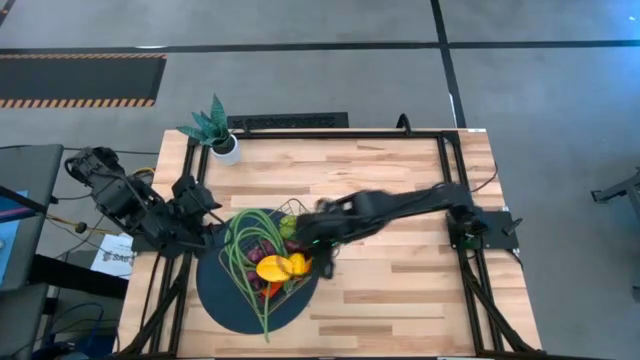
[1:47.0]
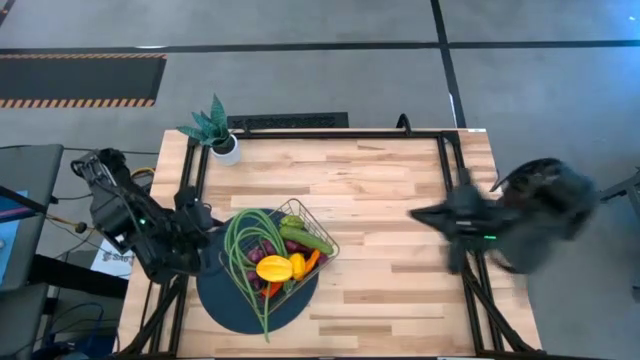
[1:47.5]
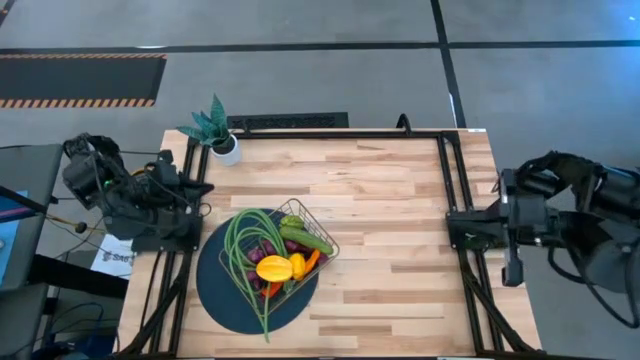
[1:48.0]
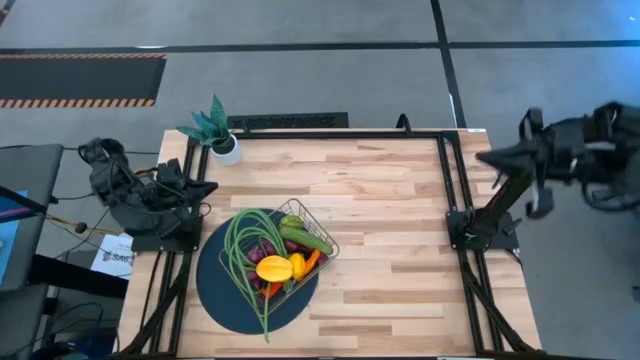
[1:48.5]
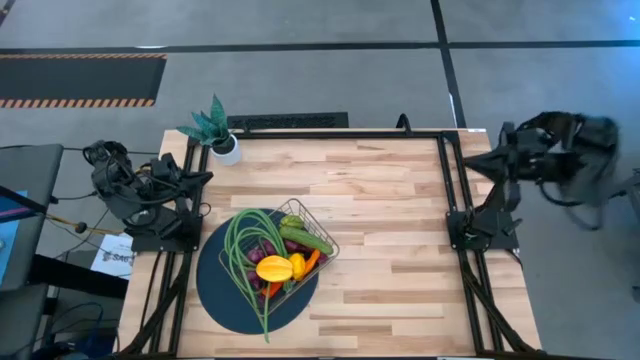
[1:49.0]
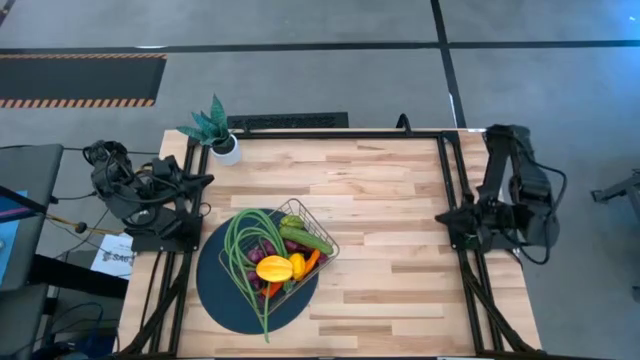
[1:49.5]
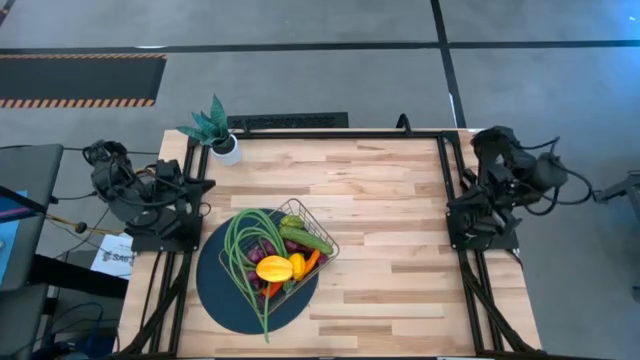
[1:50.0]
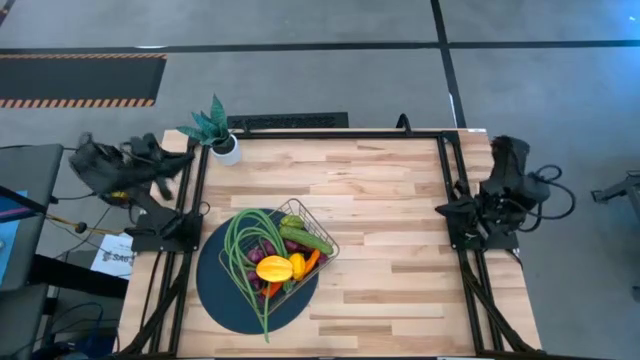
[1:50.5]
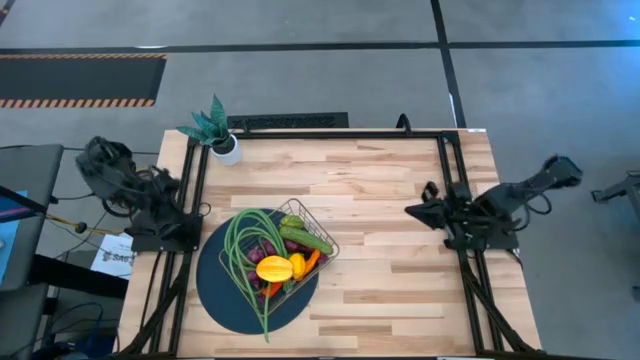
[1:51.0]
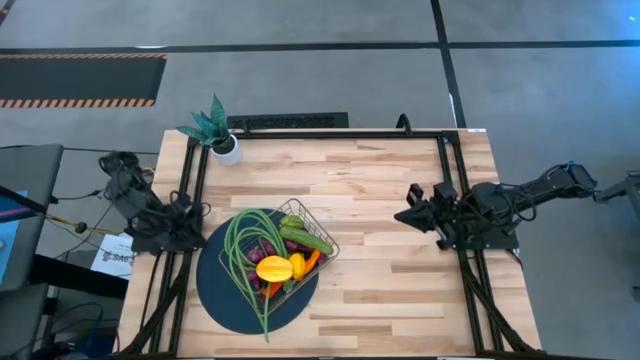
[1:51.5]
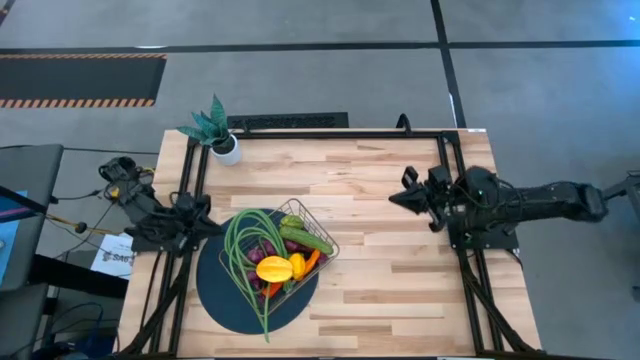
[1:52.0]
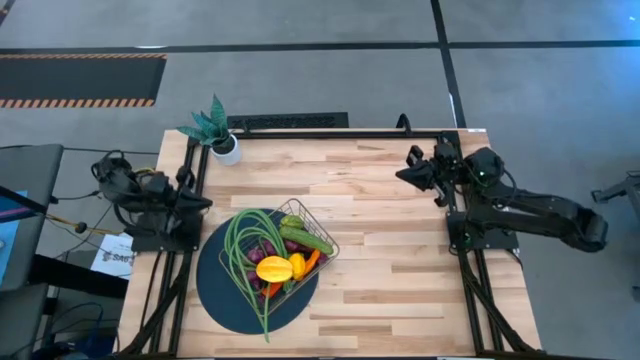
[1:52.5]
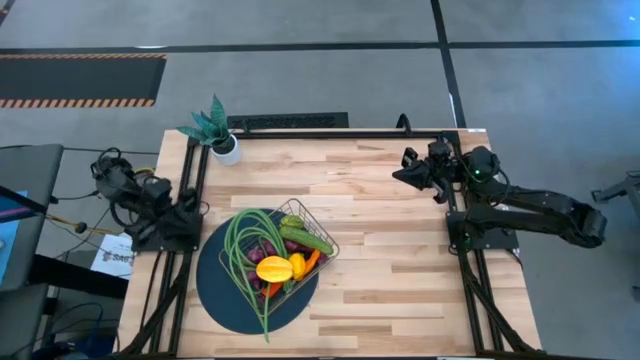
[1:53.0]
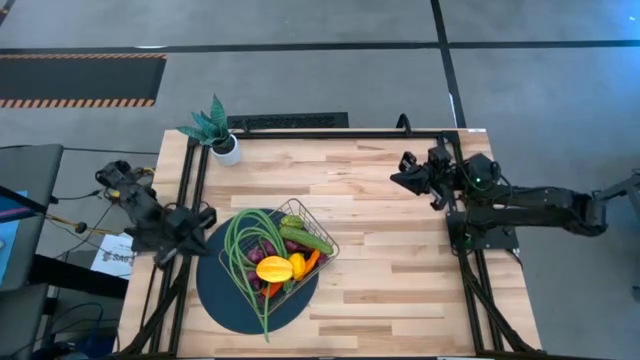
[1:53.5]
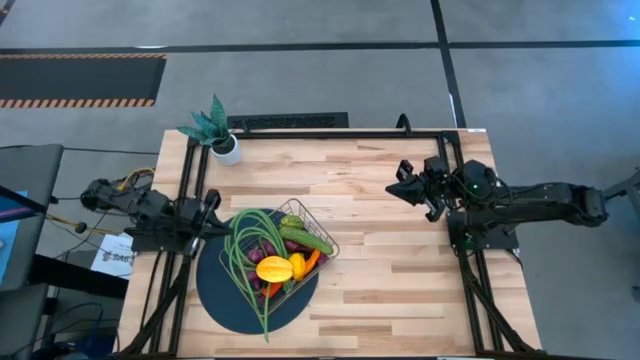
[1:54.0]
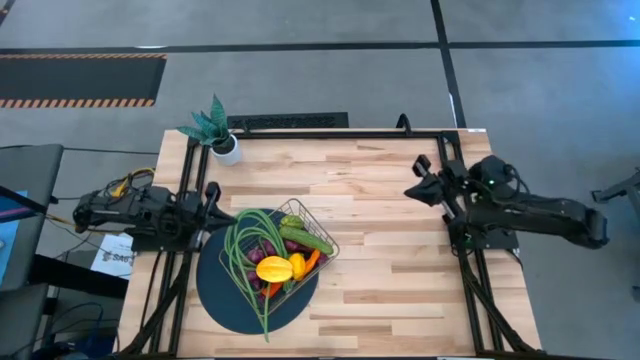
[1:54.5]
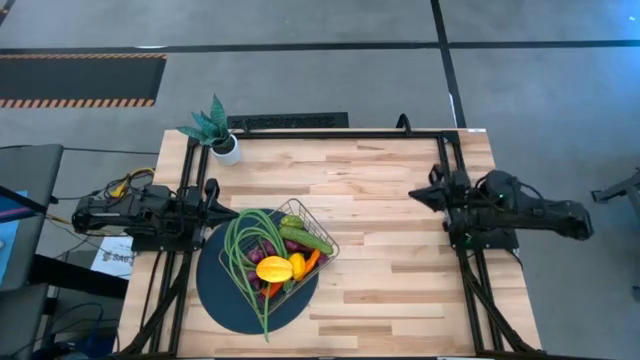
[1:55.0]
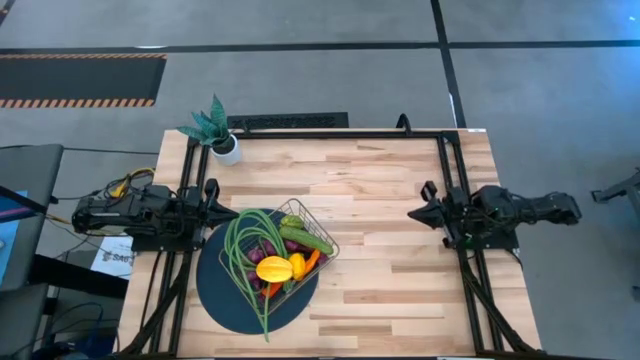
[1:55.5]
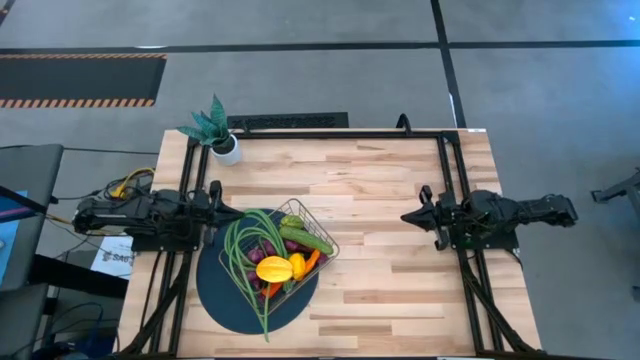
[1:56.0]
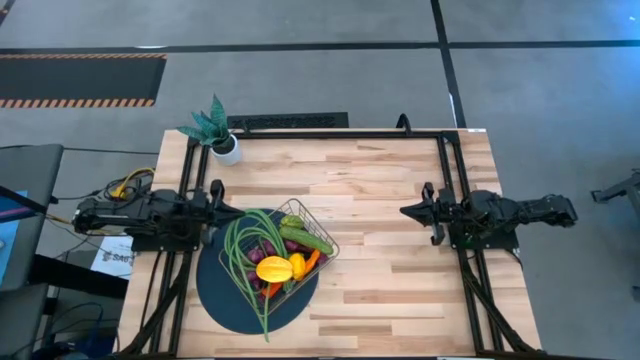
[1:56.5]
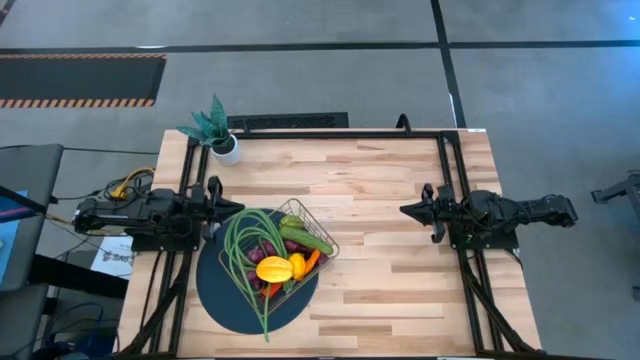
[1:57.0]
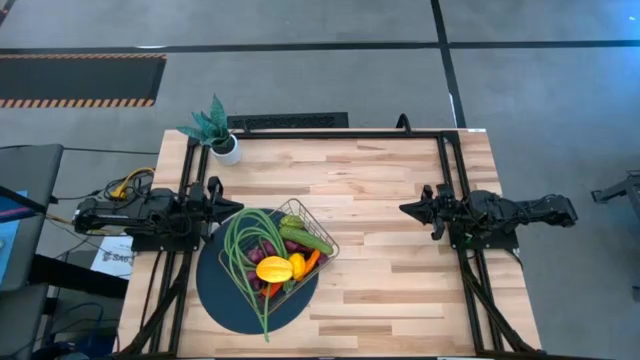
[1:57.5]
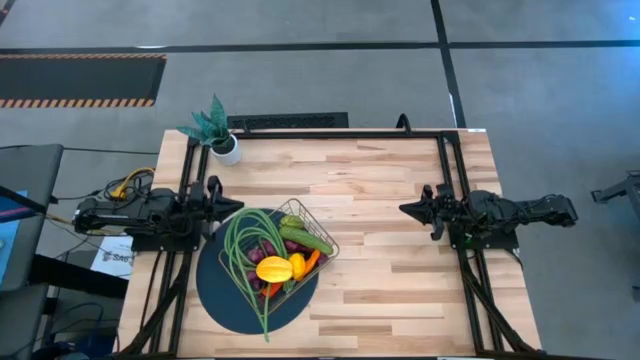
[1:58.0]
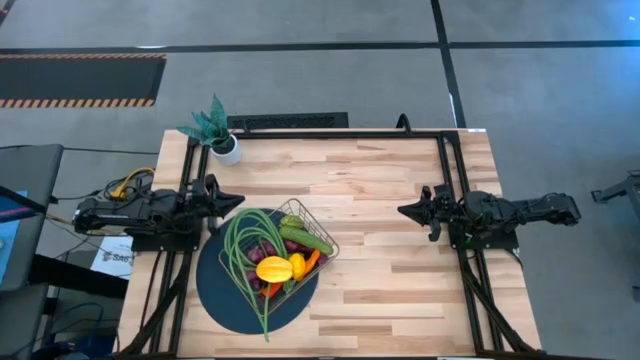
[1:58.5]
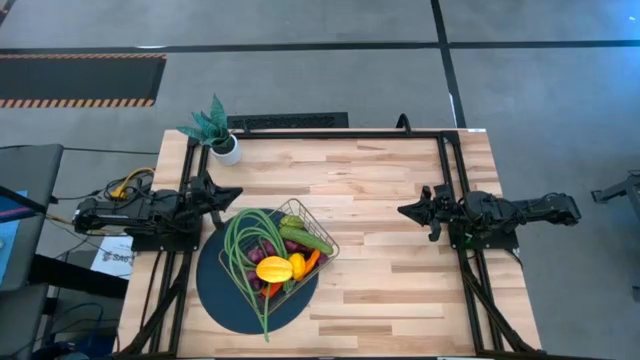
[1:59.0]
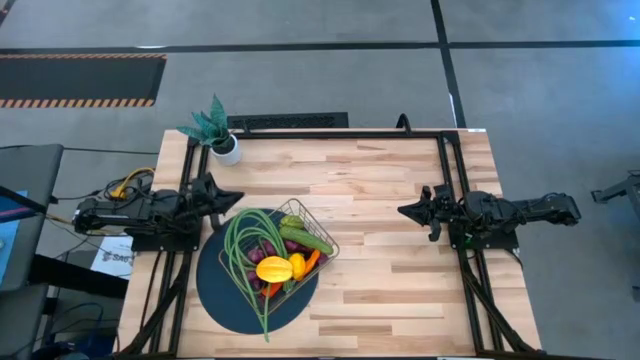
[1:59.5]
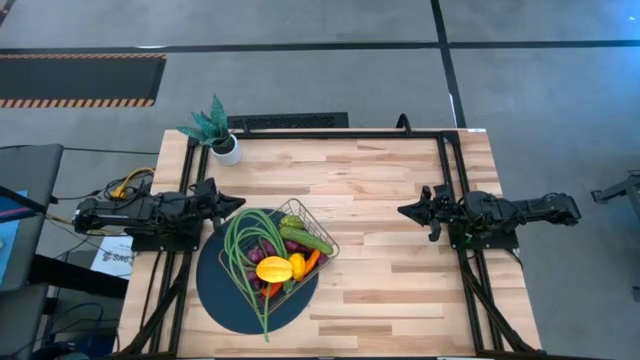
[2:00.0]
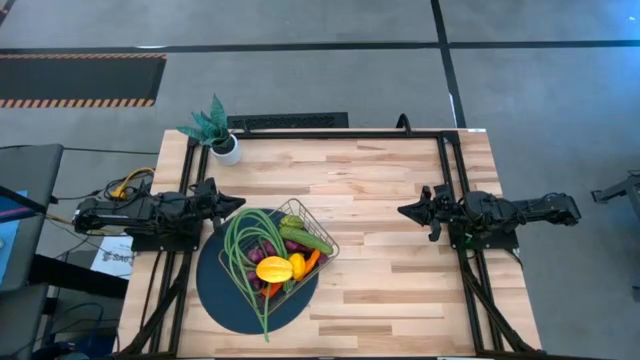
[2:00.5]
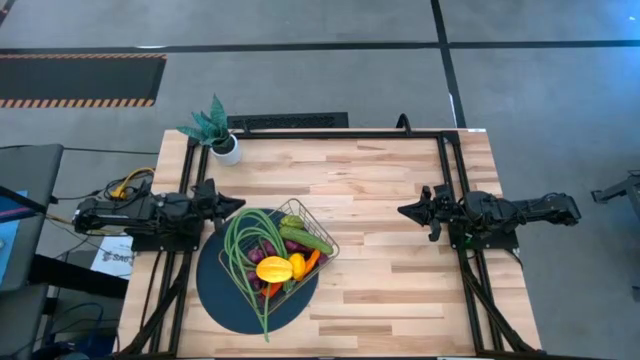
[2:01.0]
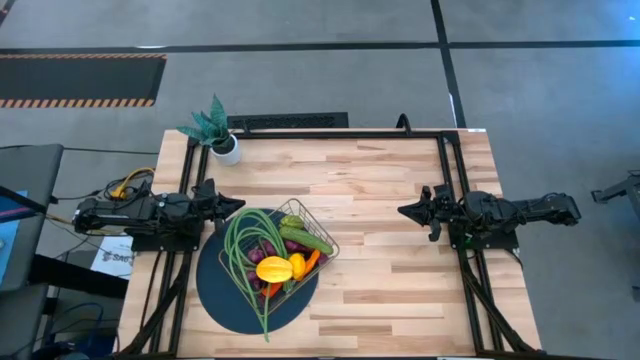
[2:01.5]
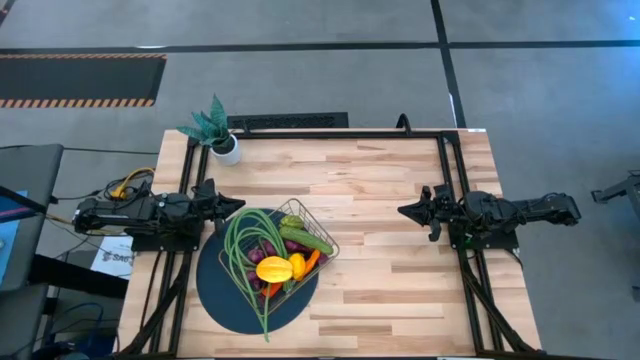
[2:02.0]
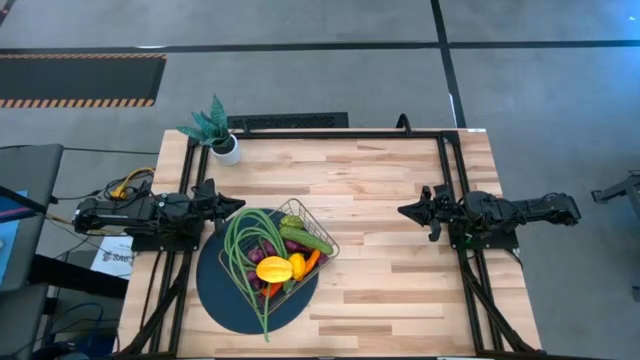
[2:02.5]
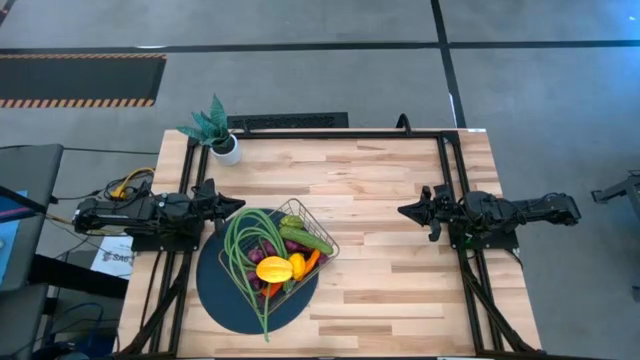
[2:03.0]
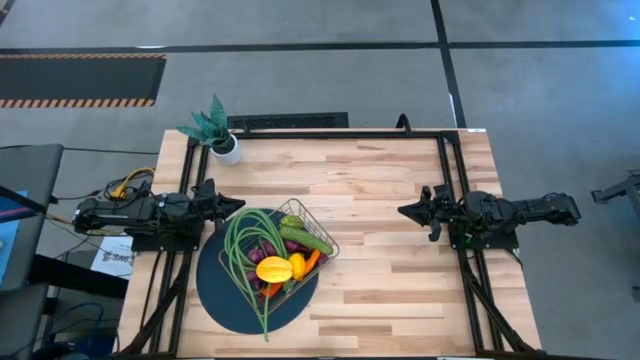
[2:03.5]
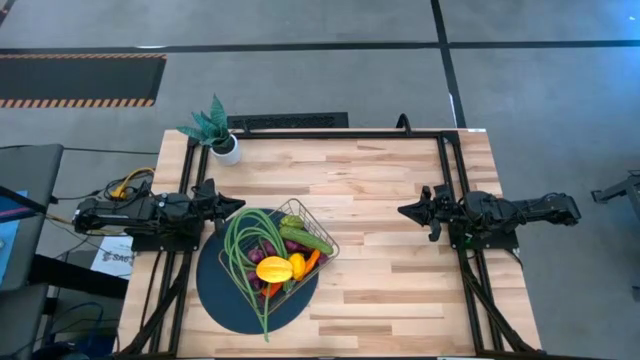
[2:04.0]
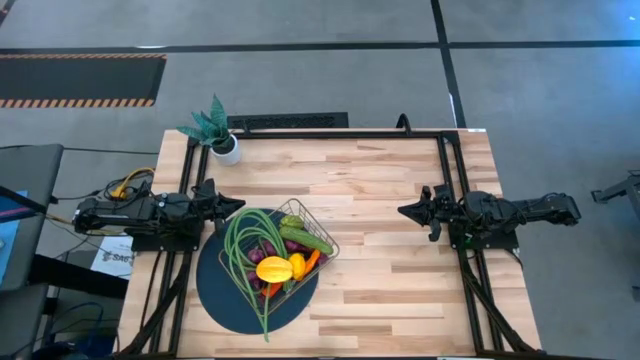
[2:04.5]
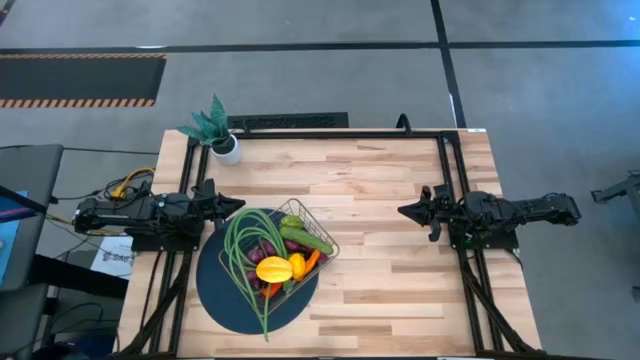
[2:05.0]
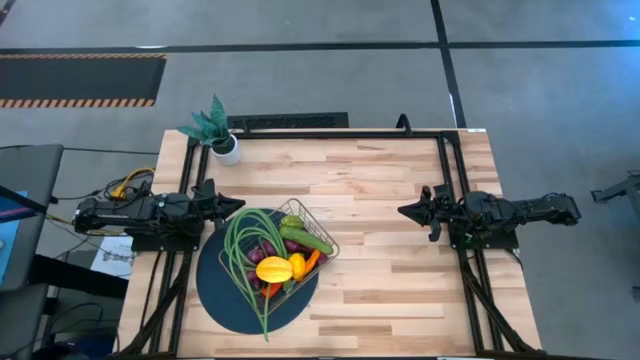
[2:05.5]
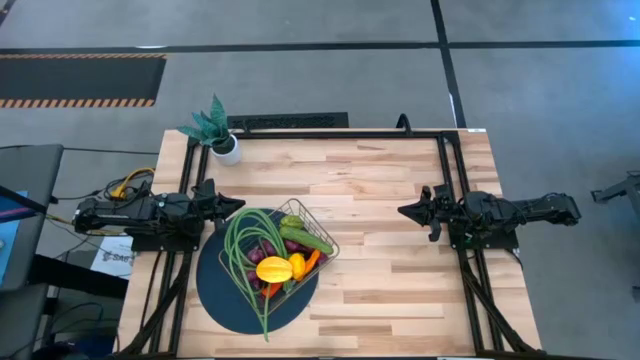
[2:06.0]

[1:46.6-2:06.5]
Task: Build produce basket
Return to Home Position
